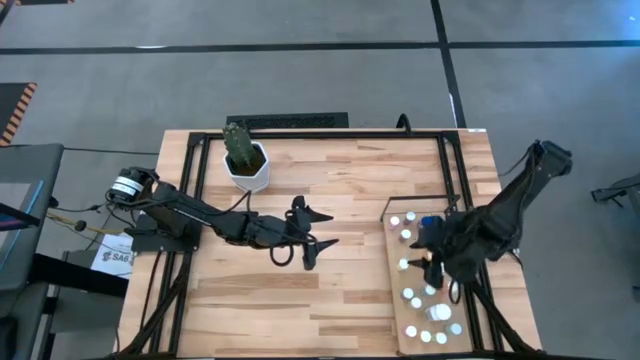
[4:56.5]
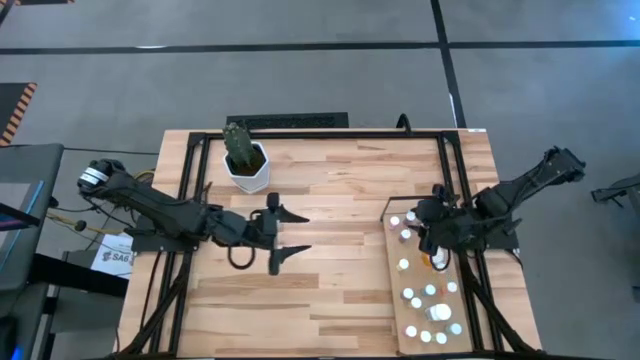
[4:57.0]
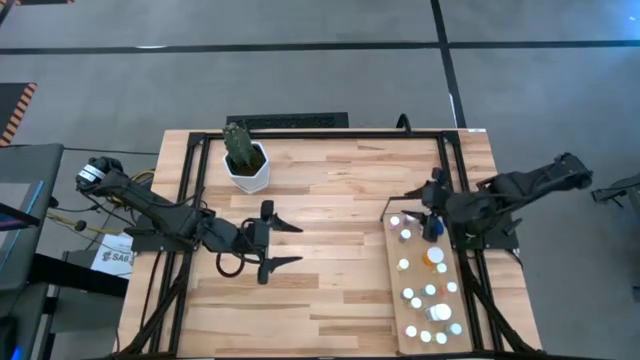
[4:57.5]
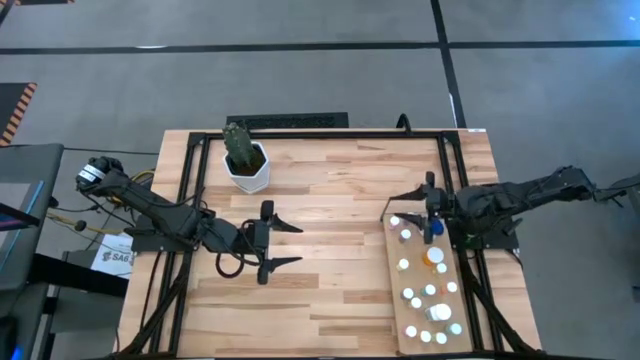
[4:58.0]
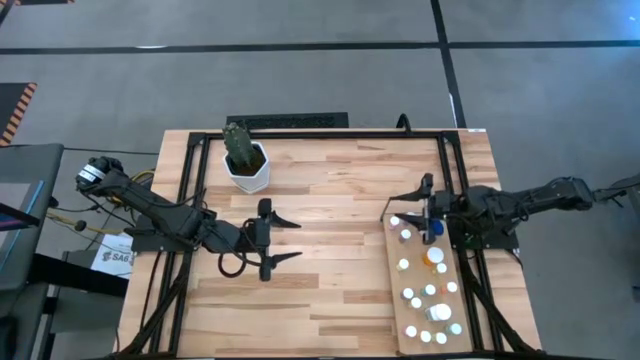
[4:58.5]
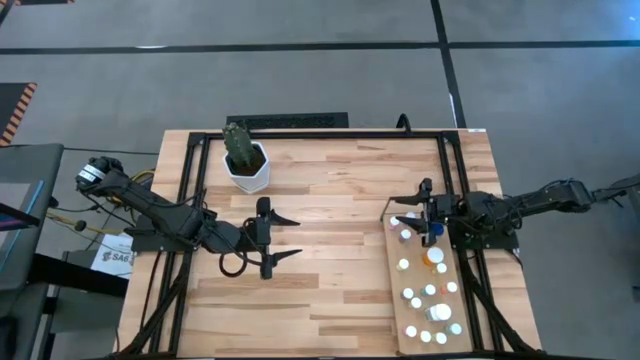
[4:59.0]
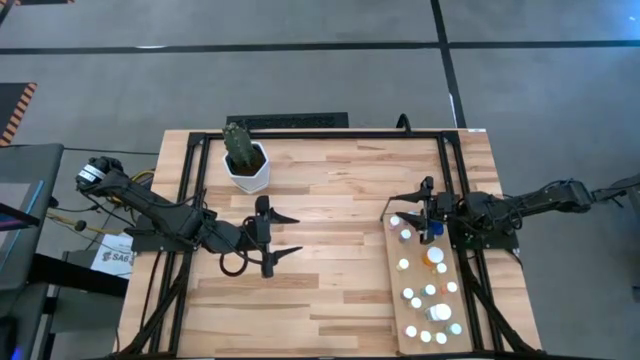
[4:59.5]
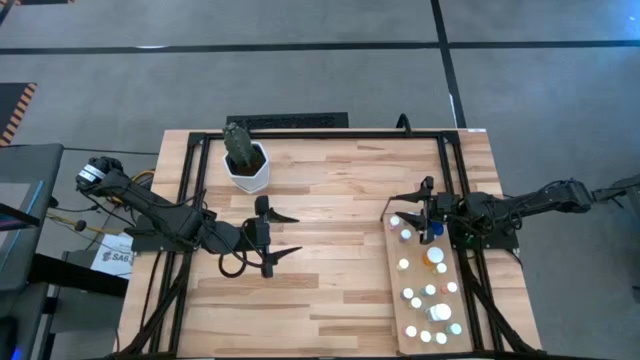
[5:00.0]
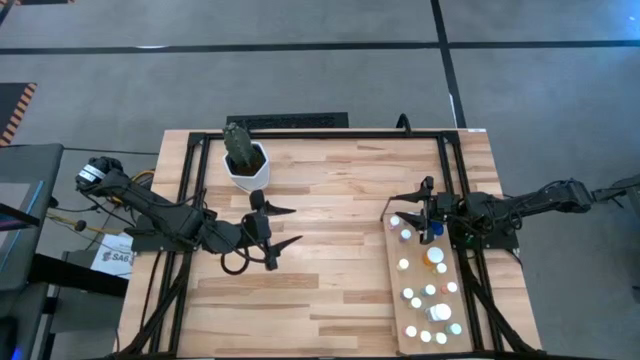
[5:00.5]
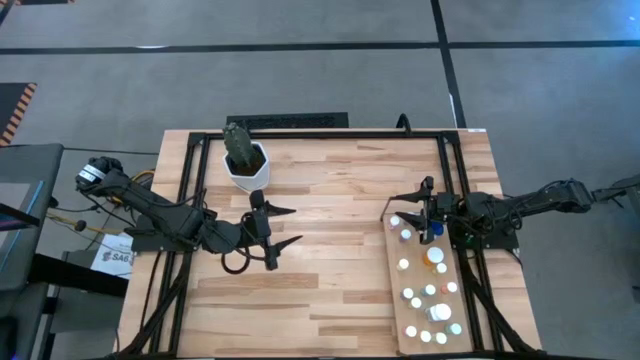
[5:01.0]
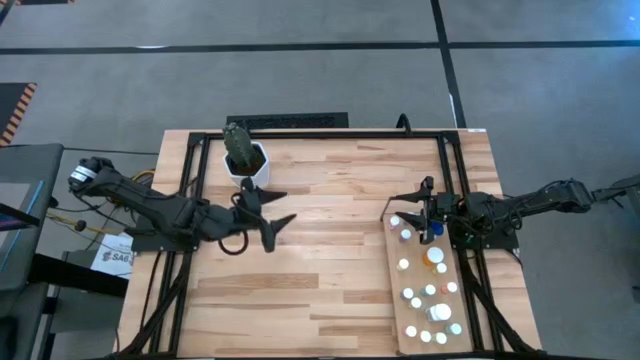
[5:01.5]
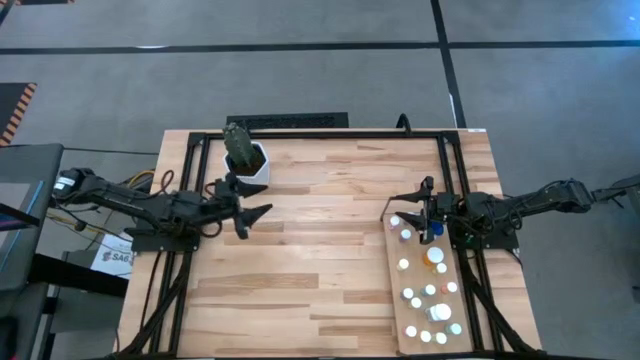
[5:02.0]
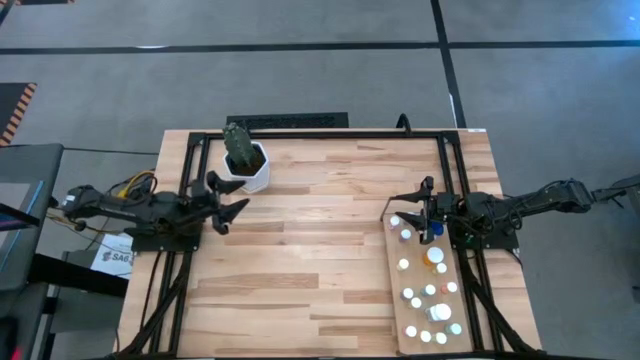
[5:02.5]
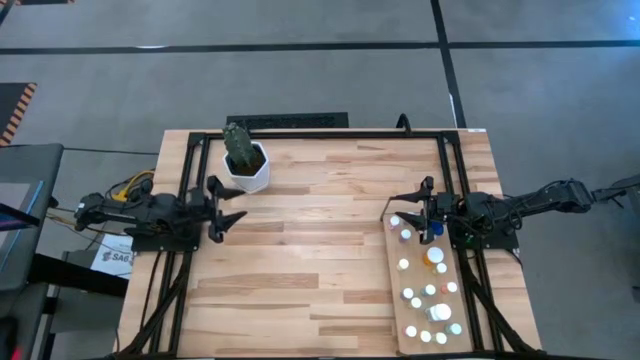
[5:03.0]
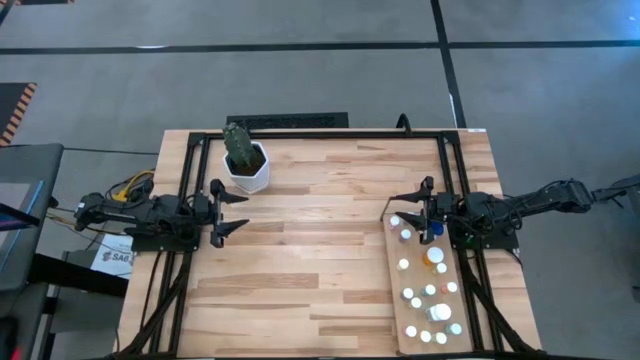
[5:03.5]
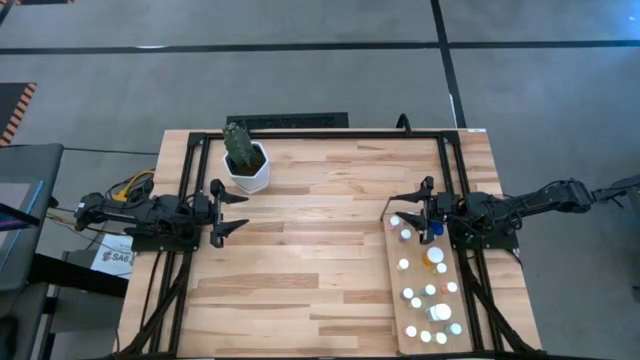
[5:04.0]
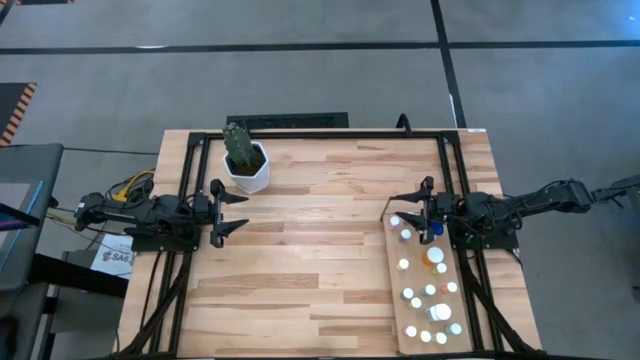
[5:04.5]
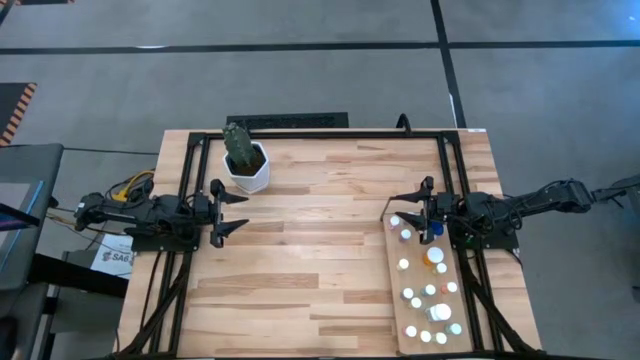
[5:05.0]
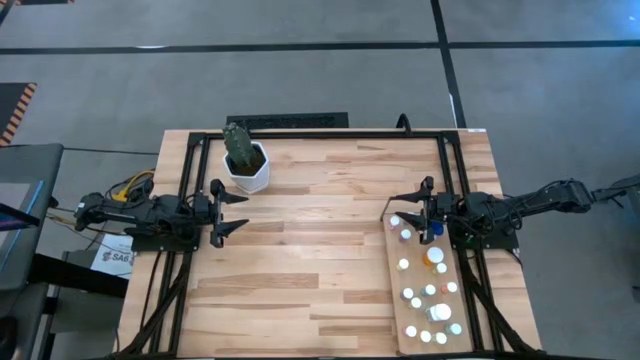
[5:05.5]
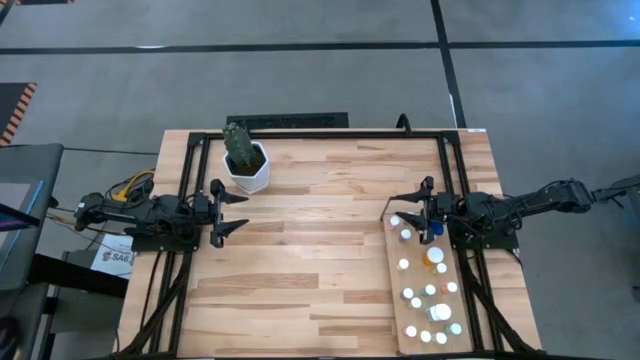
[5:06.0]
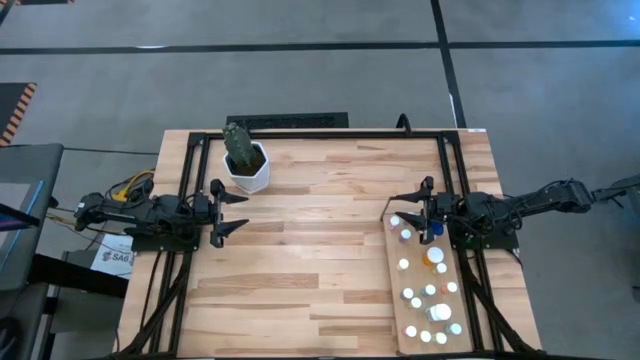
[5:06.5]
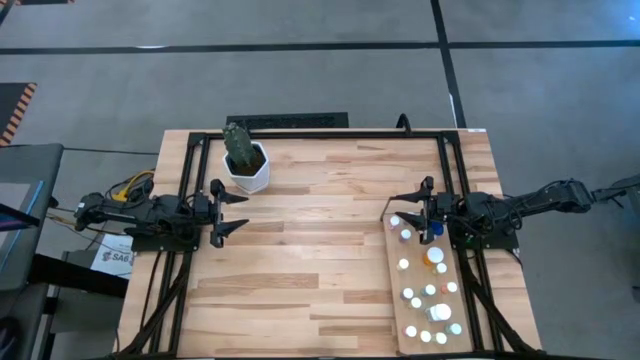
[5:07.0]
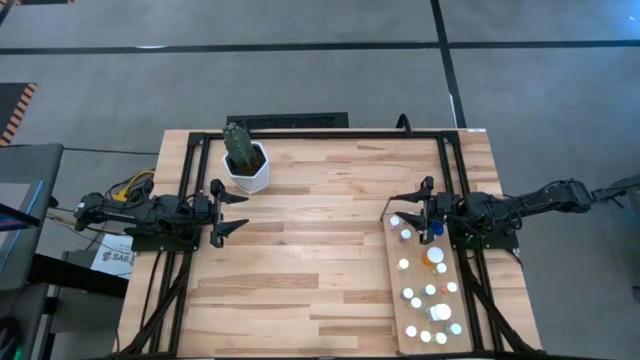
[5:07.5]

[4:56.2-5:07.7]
Task: Pick and place medicine bottles onto shelf by color
Return to Home Position

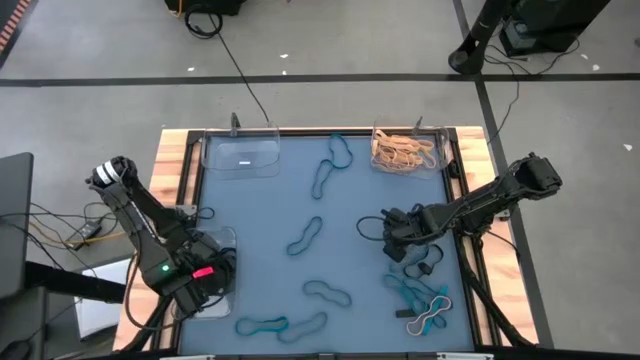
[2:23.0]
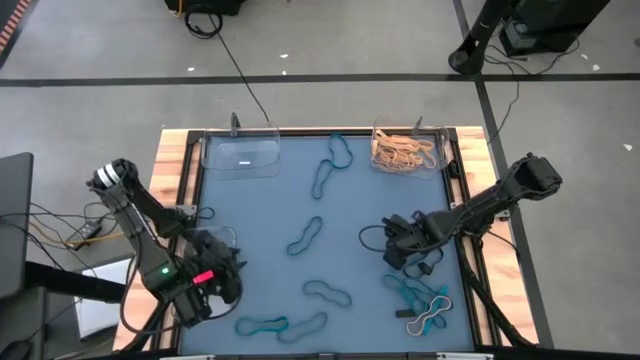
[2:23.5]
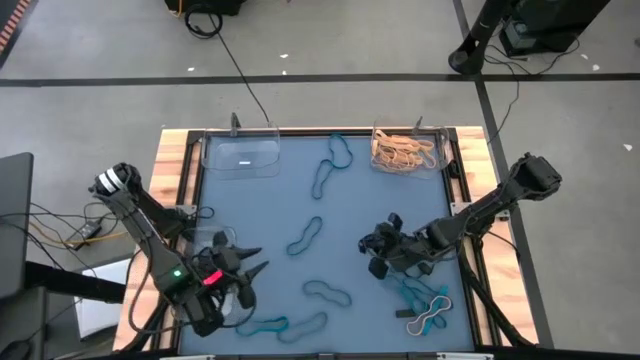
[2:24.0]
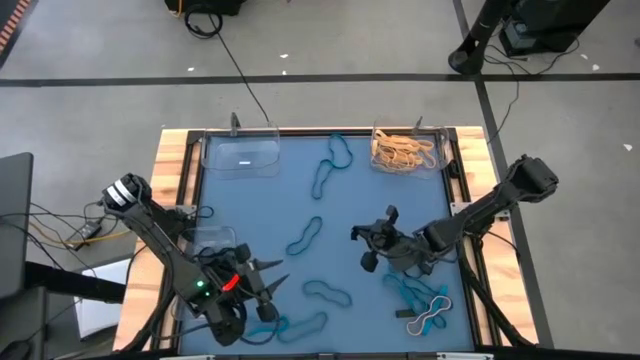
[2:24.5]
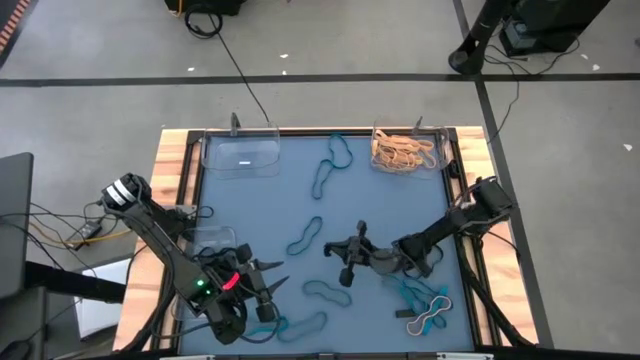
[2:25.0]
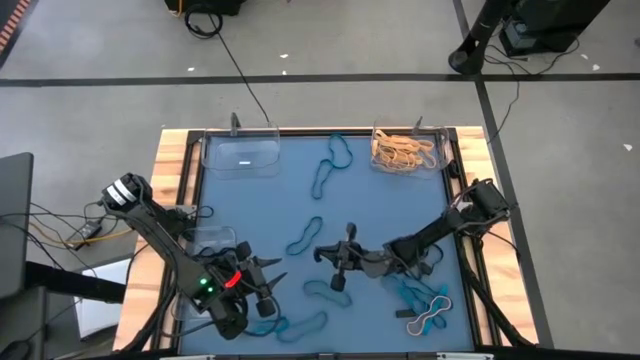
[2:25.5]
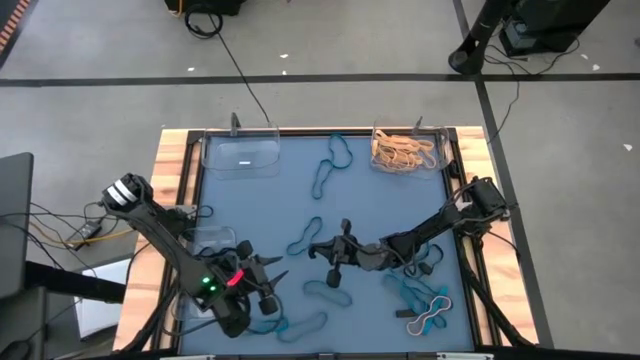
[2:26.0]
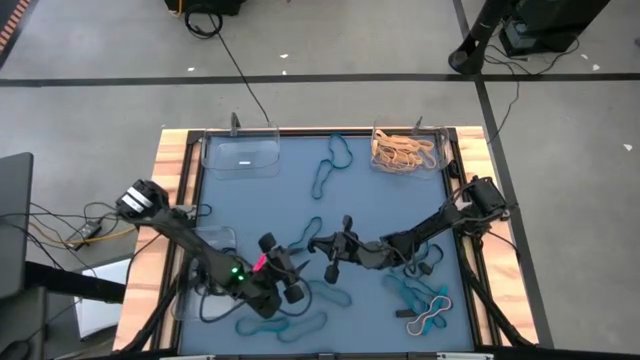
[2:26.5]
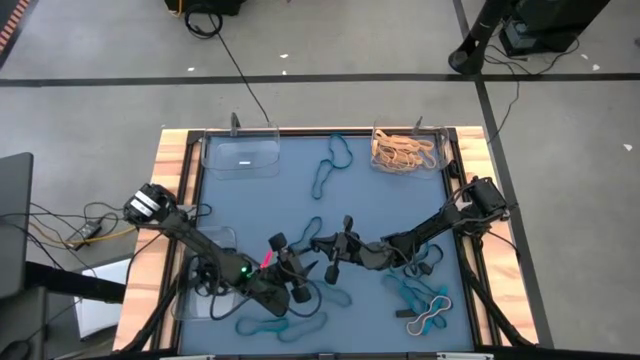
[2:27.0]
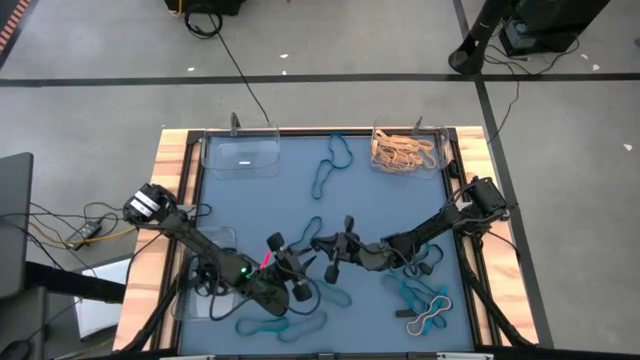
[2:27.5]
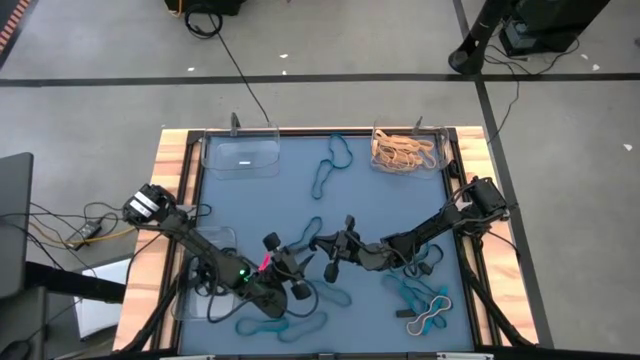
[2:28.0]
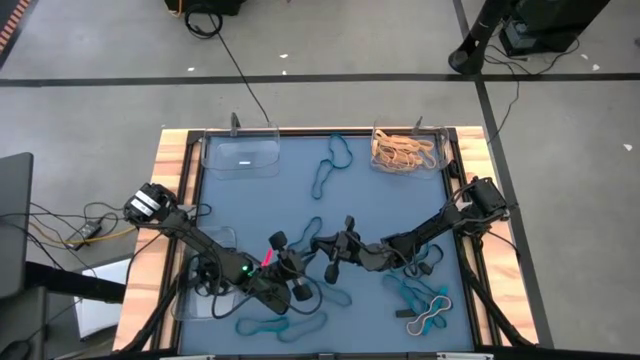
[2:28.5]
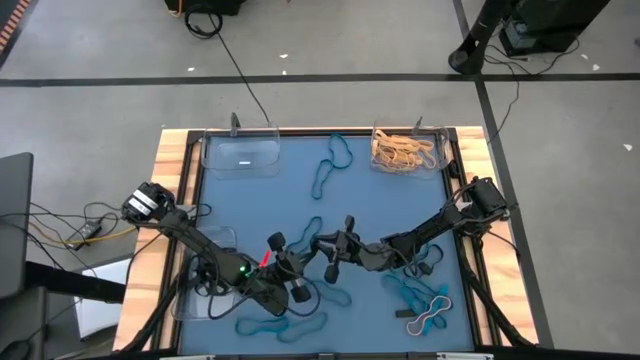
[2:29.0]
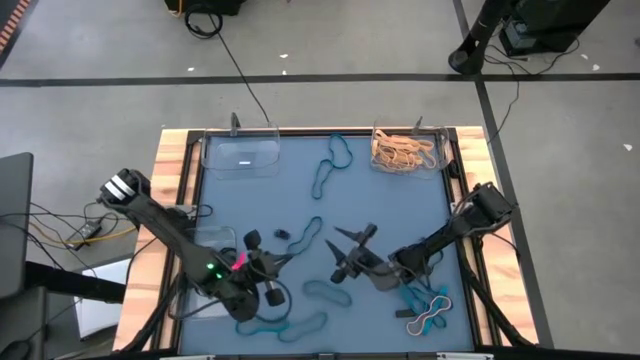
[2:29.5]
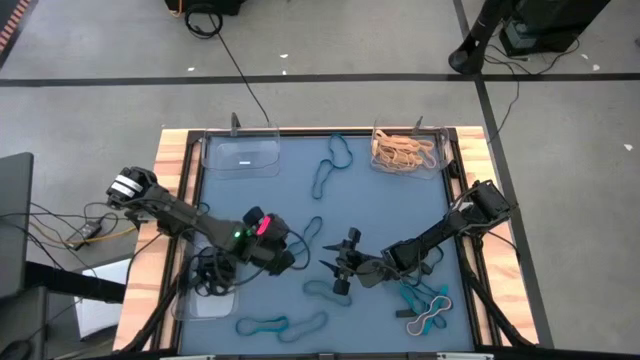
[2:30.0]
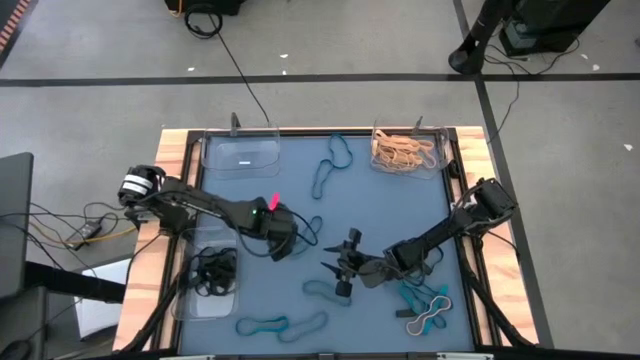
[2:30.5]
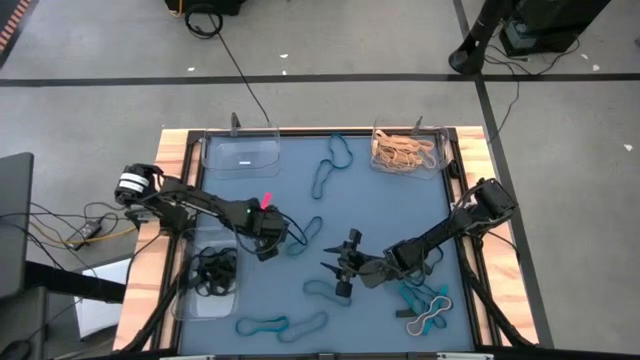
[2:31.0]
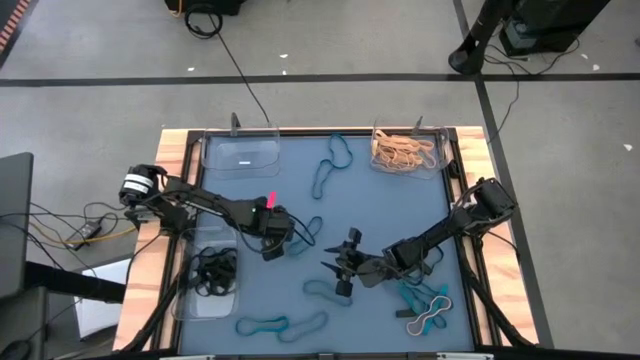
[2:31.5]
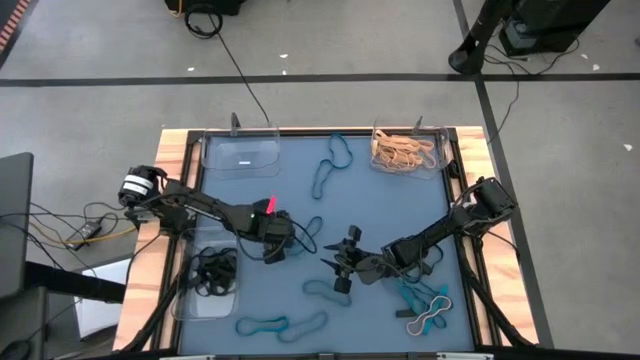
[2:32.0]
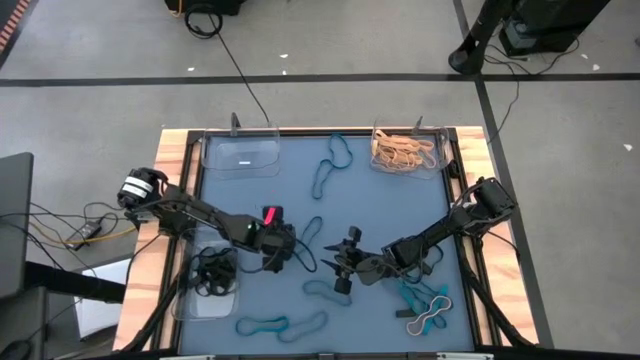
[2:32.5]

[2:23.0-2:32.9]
Task: Sort rubber bands into baskets
Put the small black rubber band into the bottom left transparent bin
